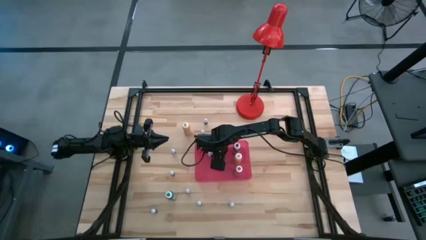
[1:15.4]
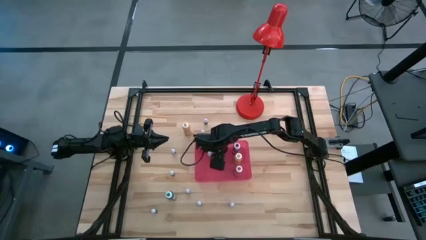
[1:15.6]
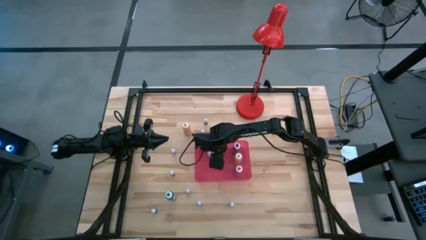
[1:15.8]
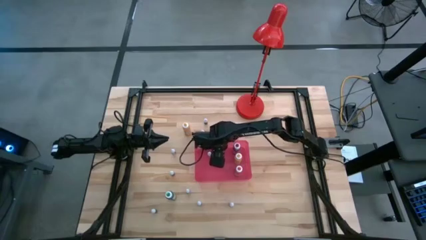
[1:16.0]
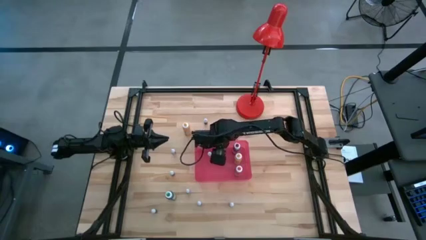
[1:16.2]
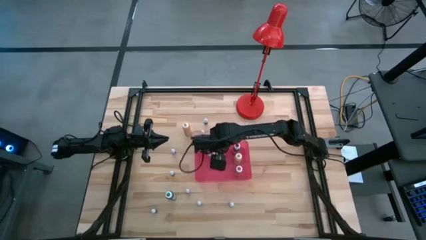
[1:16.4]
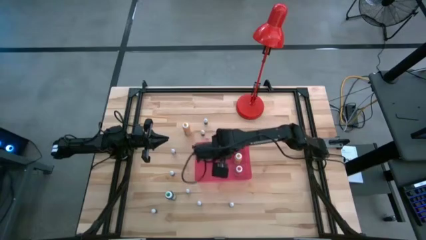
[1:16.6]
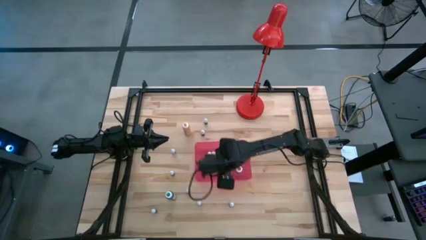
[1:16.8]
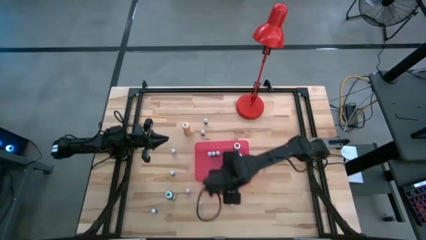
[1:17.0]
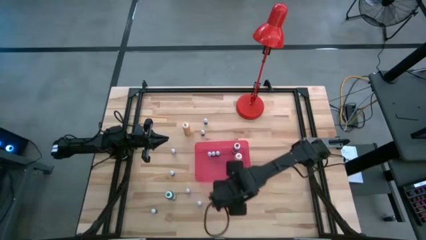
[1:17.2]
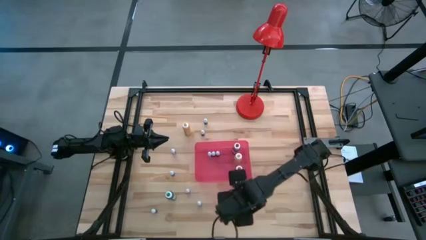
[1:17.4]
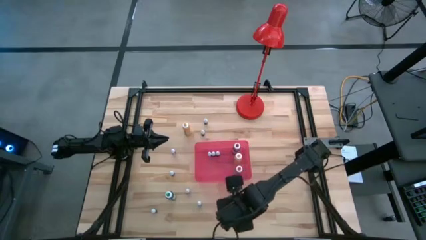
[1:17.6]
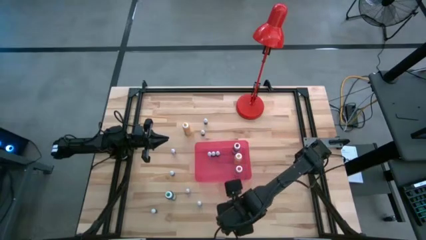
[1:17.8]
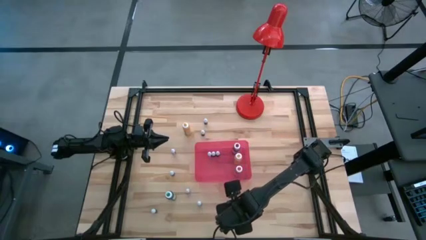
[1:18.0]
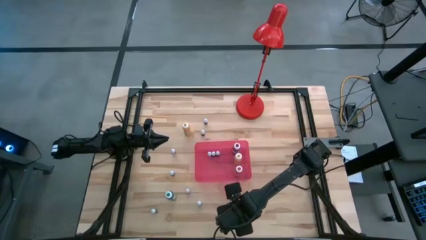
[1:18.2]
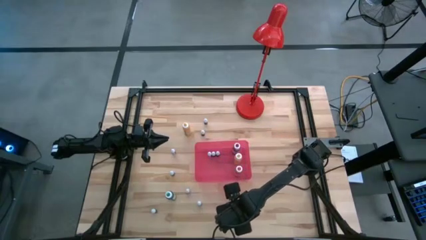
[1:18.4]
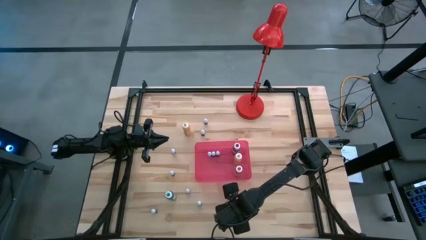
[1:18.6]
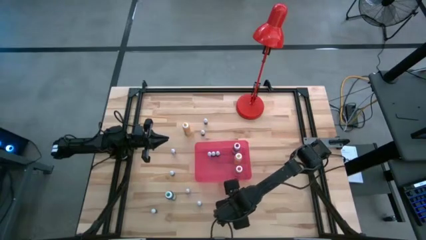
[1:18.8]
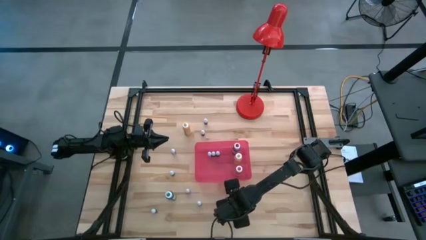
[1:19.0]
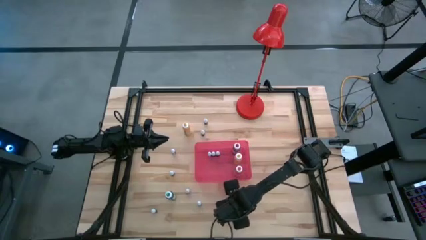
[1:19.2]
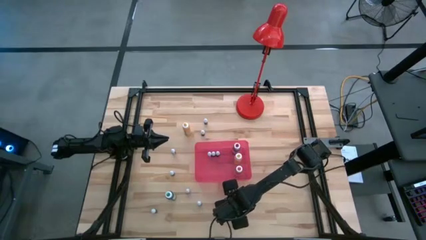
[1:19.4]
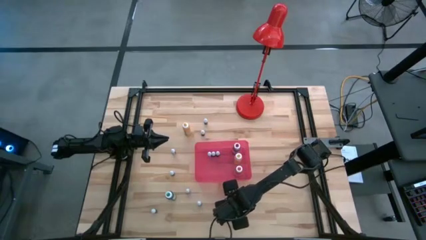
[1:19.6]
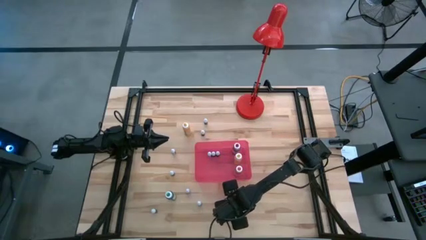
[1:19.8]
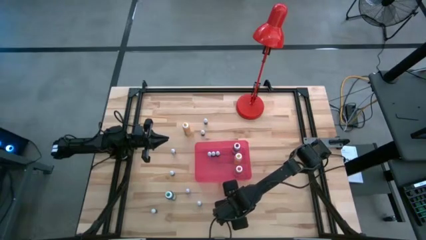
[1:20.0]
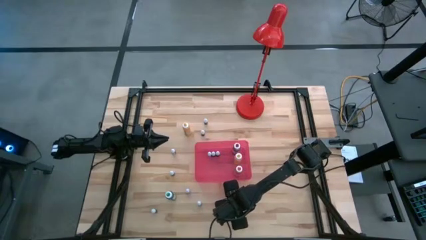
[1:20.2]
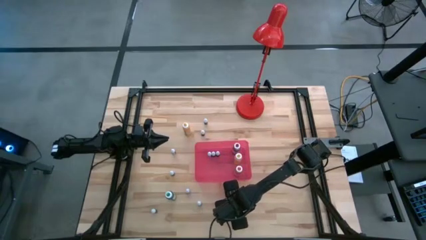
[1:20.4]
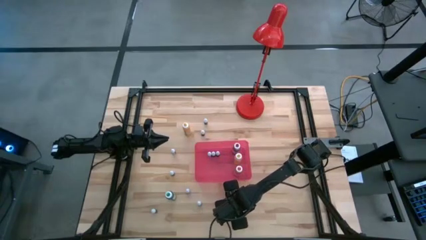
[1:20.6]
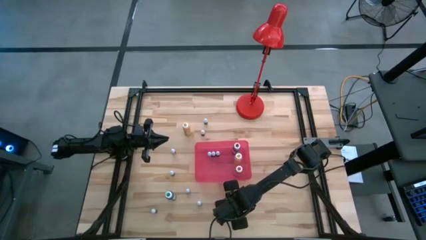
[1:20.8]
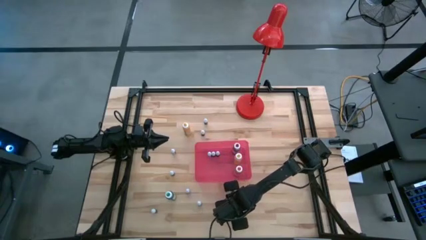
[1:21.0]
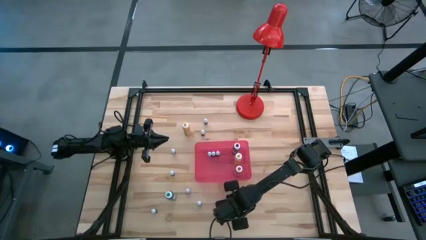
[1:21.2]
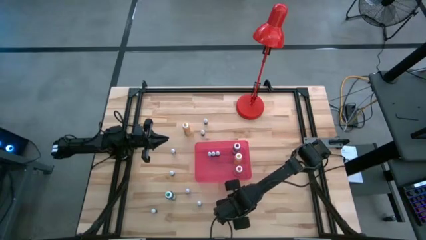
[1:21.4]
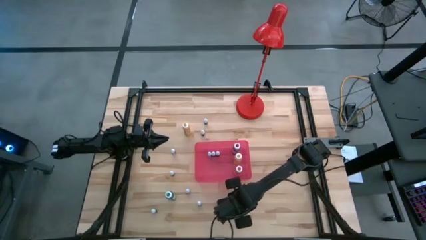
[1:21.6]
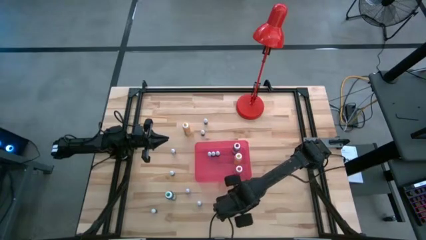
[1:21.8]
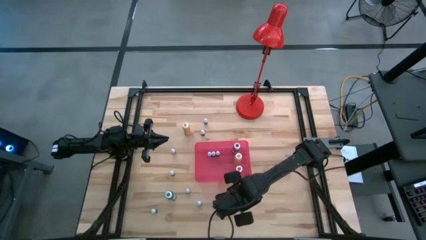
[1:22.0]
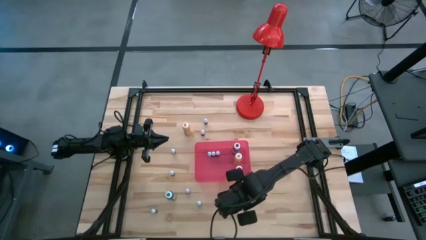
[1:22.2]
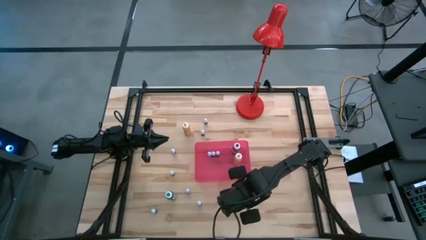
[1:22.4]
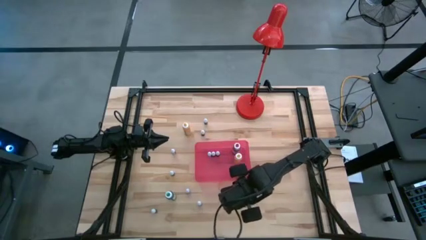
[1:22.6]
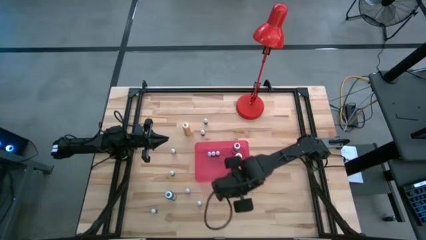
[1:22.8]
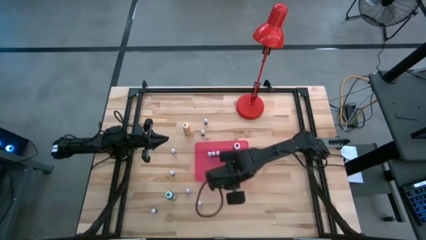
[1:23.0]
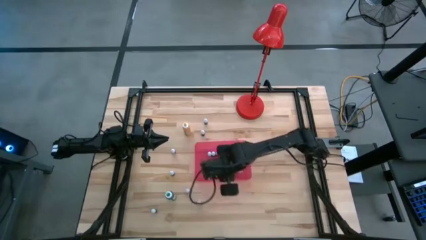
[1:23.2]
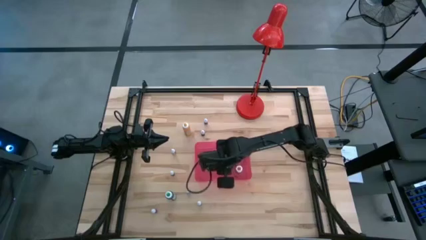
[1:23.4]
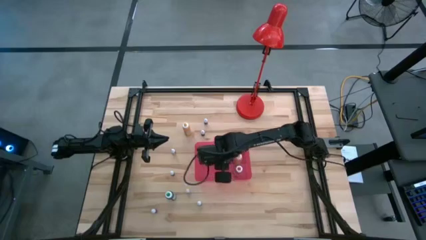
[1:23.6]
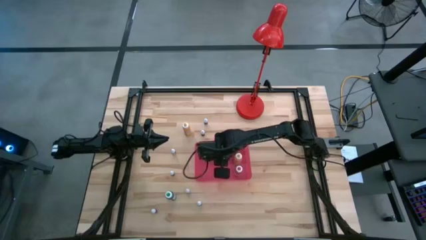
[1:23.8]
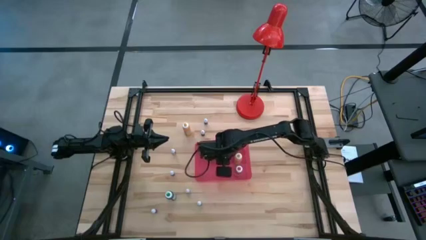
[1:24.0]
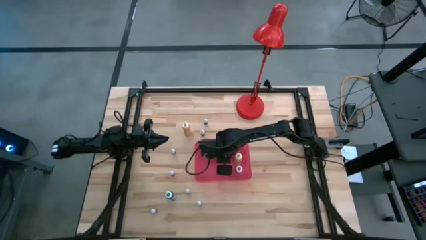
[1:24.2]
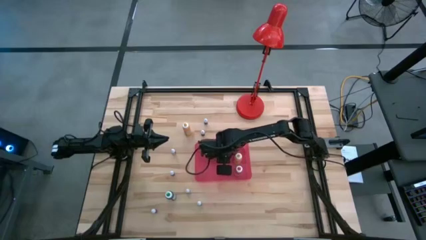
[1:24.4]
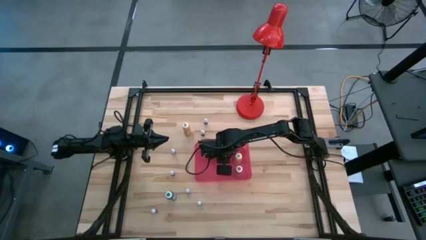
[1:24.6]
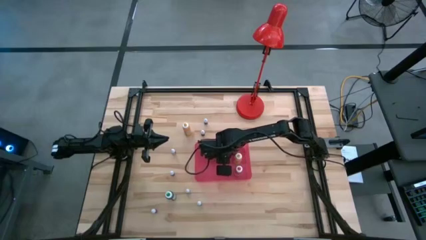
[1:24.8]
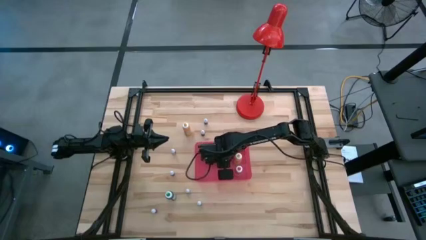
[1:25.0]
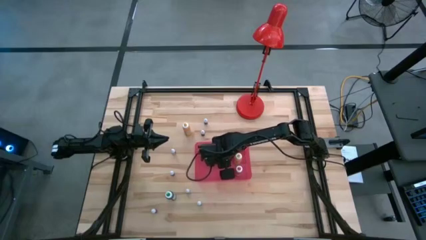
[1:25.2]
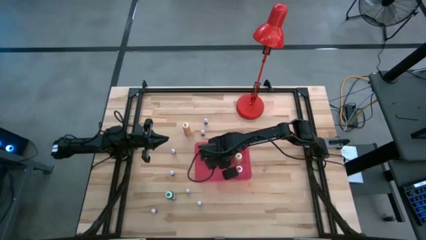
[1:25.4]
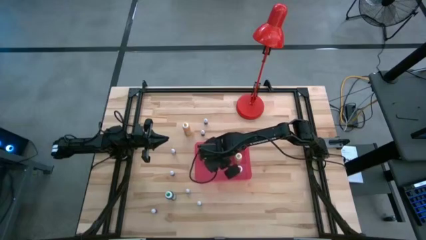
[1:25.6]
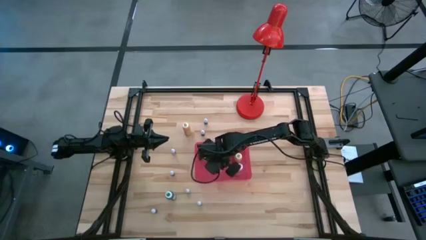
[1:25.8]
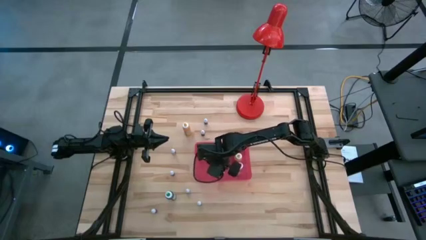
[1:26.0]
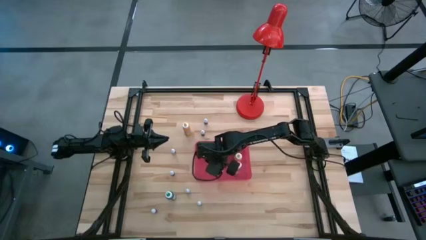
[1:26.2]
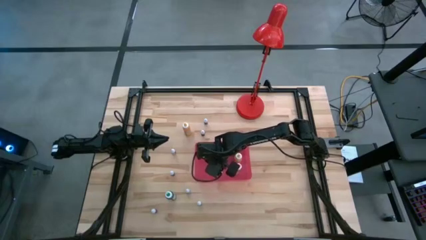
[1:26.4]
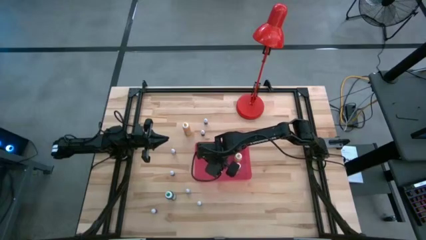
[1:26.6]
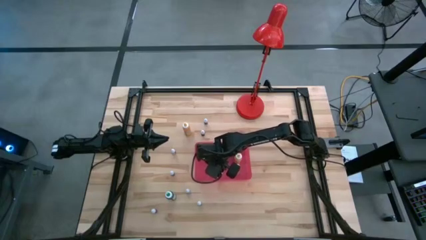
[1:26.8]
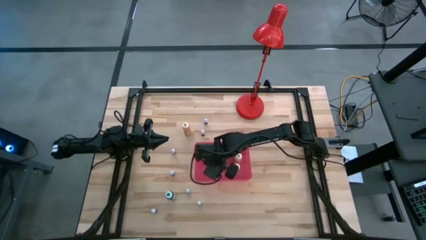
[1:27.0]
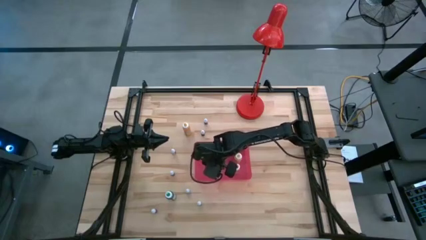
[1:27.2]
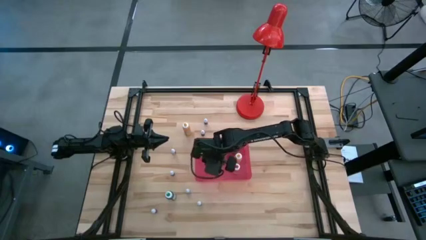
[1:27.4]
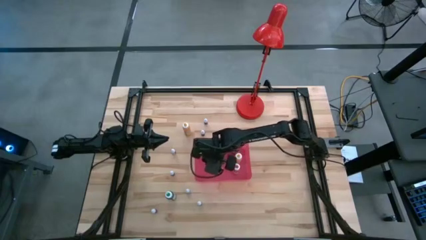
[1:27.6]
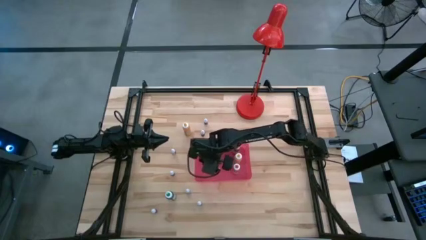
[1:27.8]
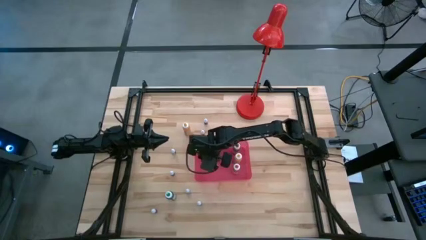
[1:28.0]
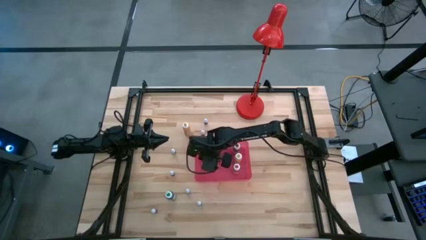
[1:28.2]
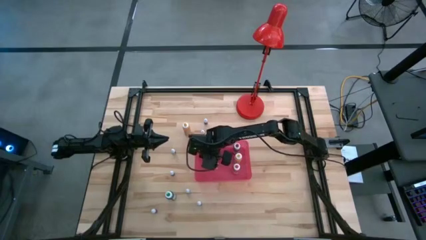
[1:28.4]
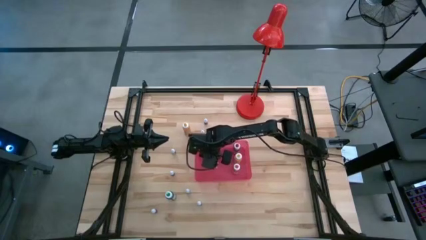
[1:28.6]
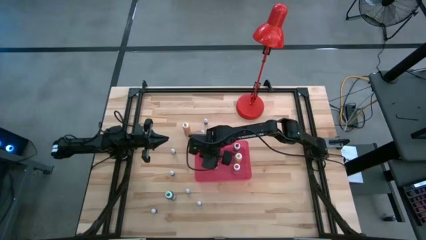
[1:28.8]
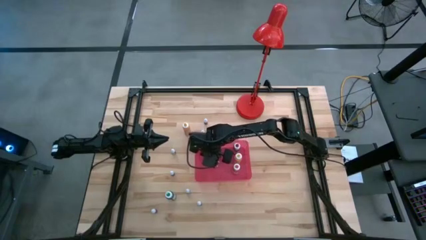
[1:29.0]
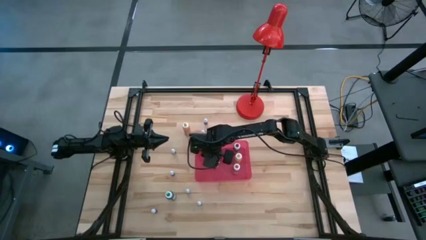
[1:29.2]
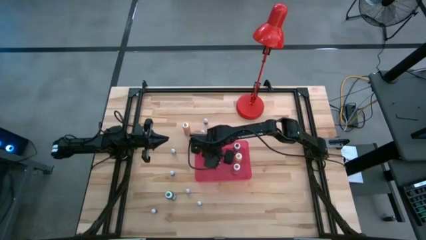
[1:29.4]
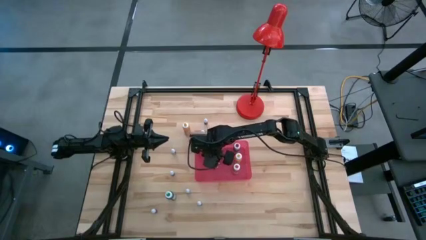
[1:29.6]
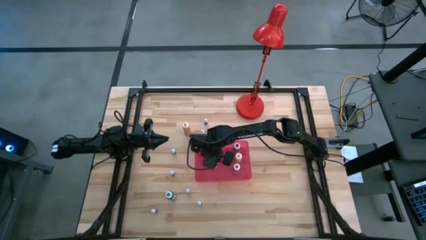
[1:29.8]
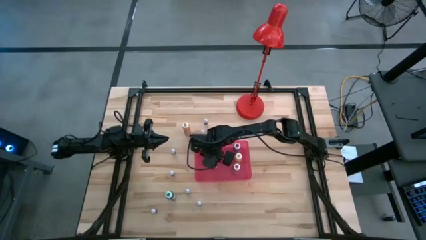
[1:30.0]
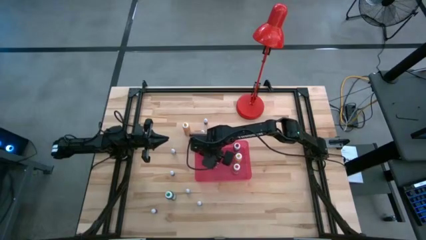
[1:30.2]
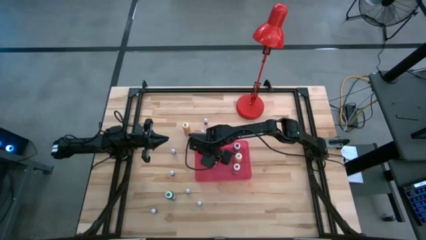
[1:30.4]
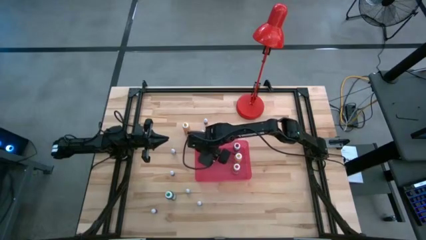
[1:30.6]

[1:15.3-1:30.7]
Task: Pick & Place food coloring
Put the small black food coloring bottle into the red bin

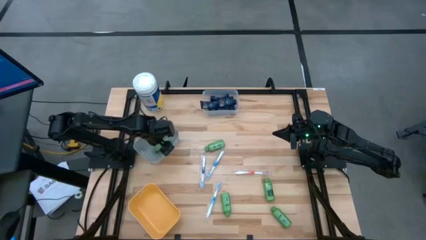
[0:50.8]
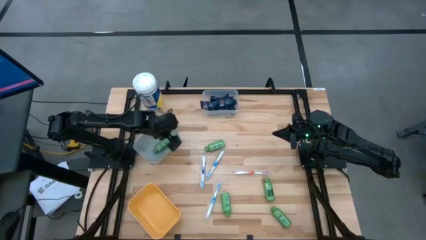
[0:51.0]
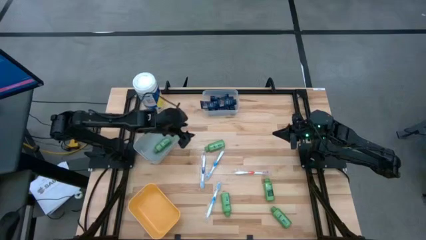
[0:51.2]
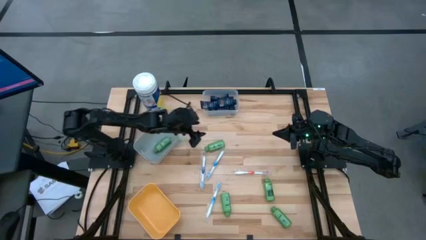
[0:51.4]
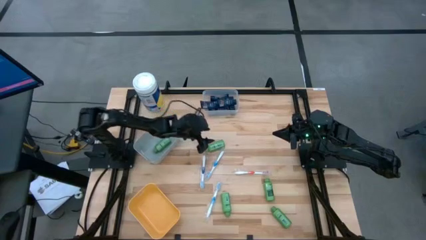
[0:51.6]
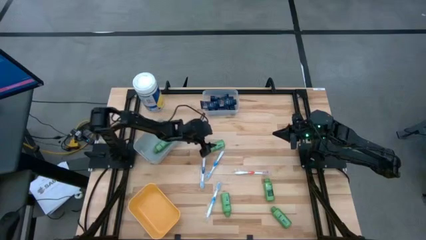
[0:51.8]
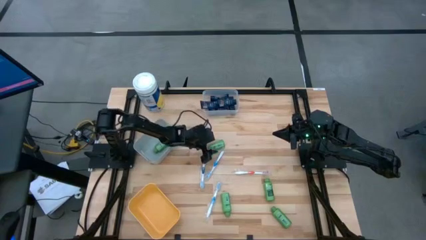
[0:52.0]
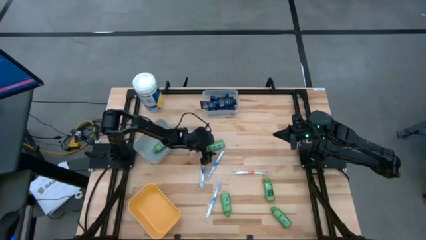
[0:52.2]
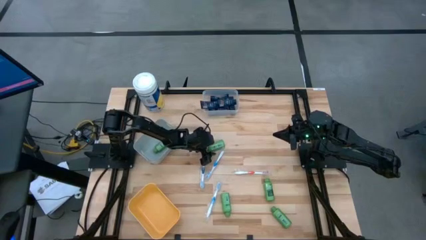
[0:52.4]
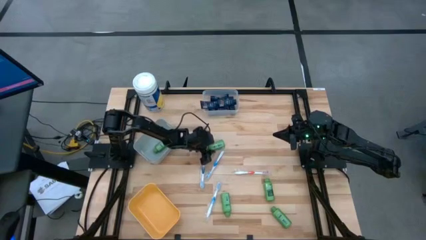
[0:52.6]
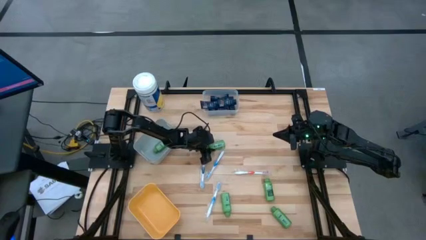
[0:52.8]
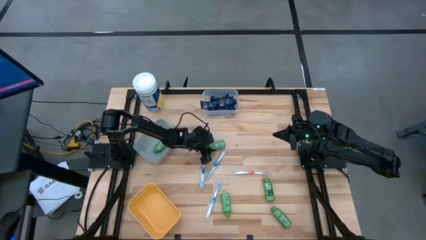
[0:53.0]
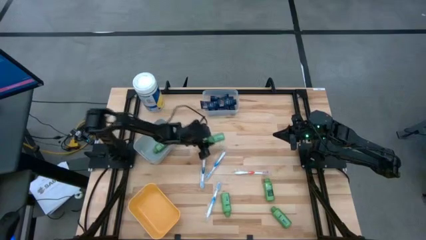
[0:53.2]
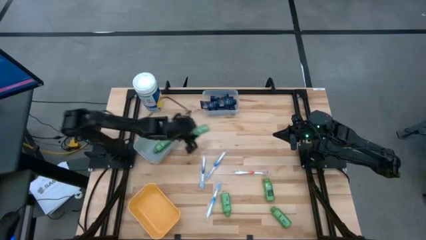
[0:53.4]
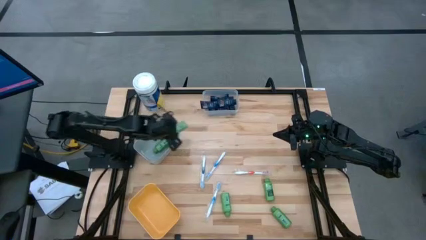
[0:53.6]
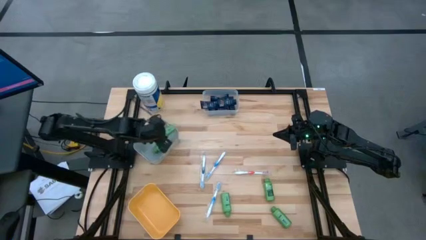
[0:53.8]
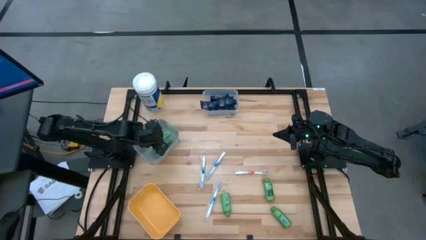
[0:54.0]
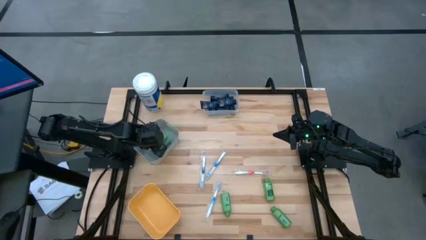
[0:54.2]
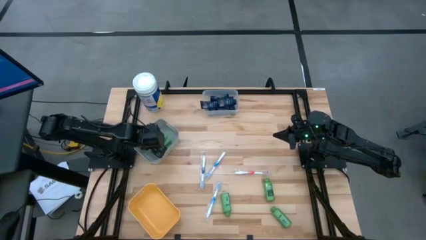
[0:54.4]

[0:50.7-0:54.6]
Task: Pick & Place Travel size toiletries
Put the green shampoo into the gray bin
